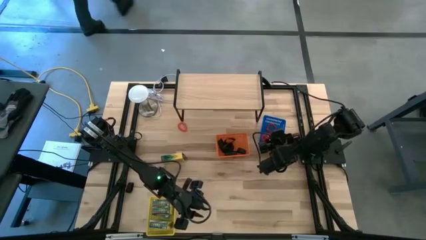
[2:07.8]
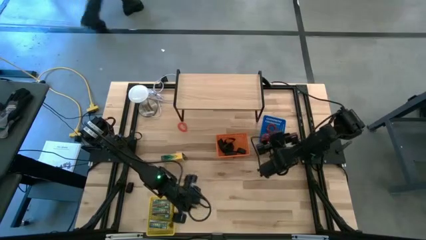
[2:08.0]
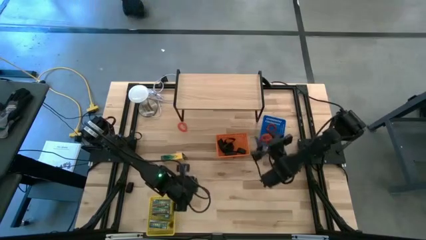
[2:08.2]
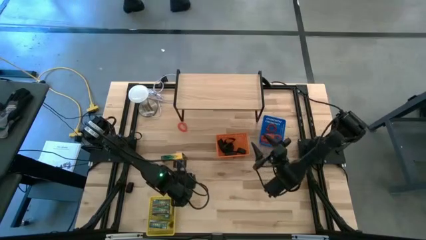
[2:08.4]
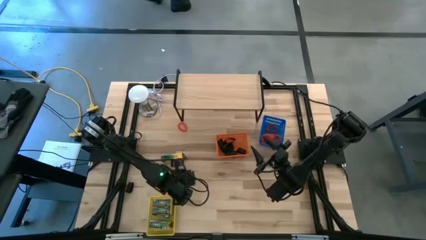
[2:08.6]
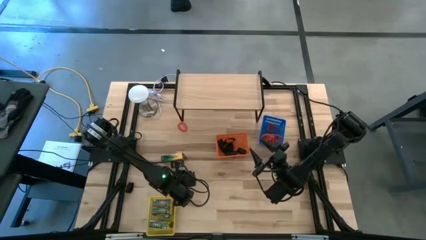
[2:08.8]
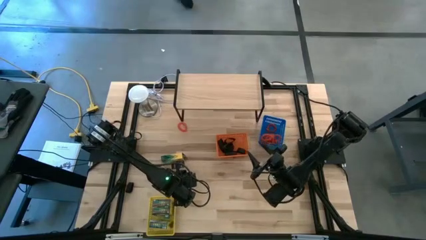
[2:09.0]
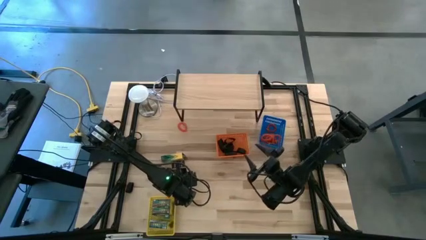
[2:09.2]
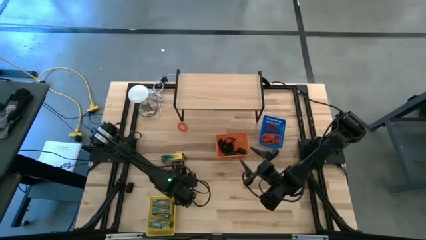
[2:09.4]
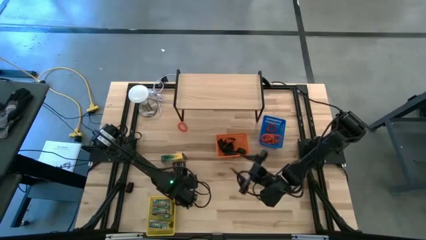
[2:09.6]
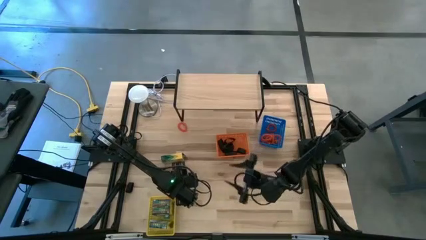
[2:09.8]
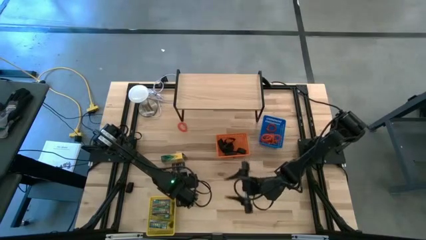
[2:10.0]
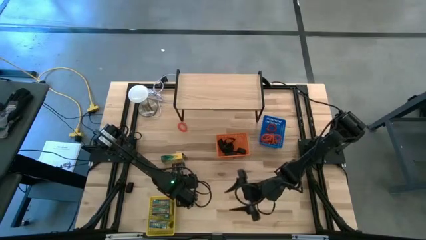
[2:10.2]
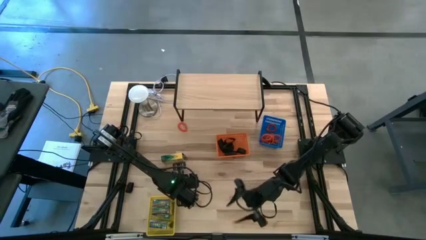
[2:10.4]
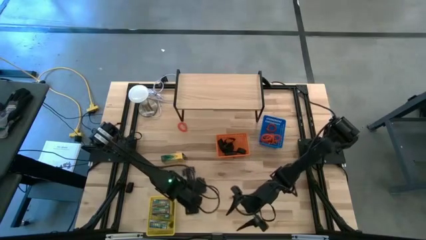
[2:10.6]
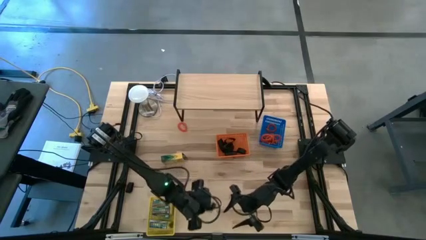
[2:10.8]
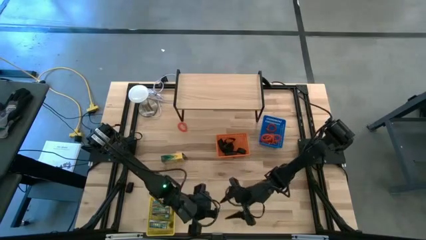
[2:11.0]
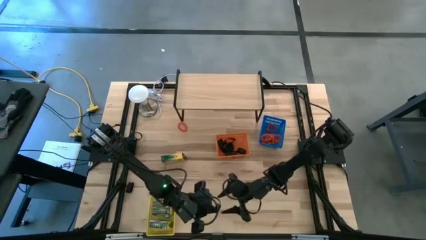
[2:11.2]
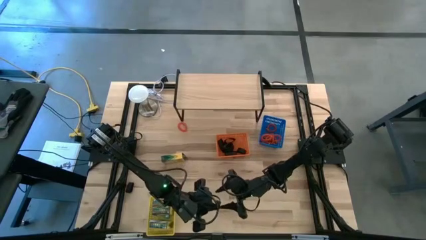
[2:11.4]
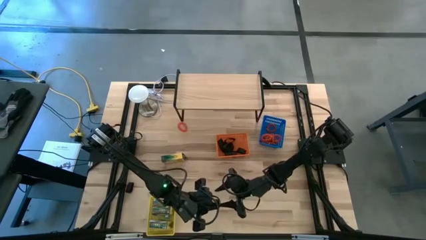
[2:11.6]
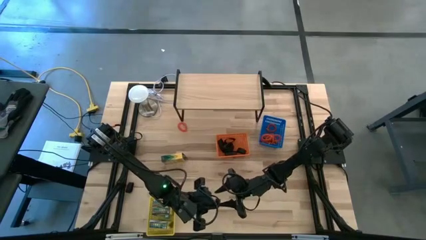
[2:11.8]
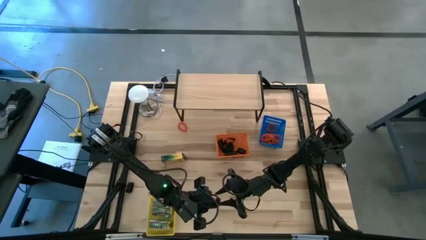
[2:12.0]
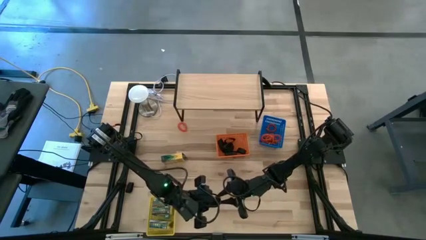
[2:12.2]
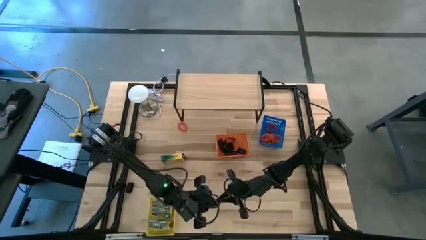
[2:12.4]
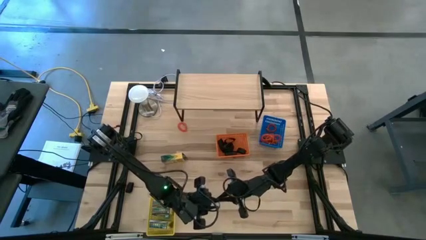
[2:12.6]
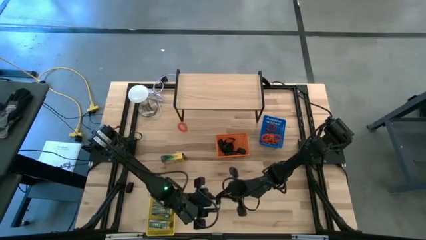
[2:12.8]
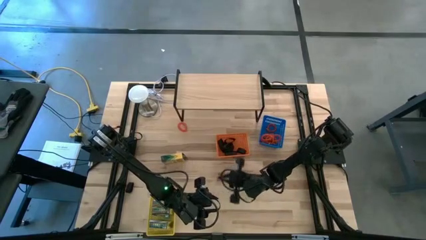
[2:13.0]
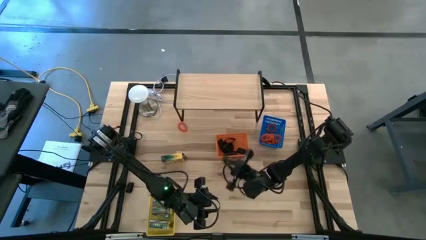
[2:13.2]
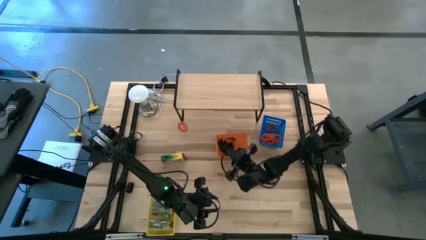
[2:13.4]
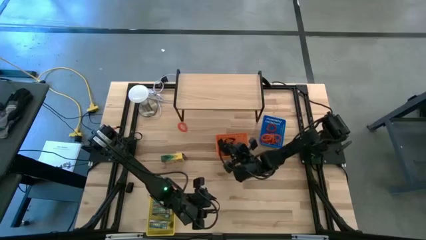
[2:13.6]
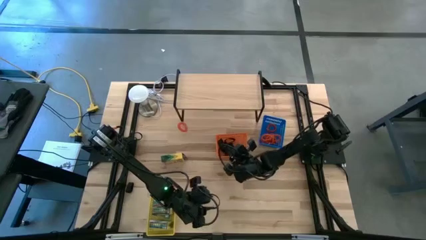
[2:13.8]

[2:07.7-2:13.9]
Task: Pick & Place Office Desk Supplies
Put the rubberband into the orange bin

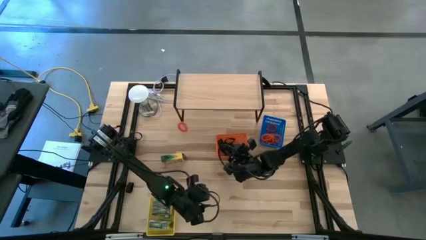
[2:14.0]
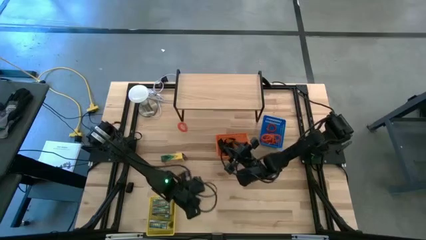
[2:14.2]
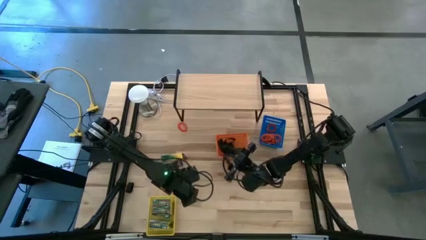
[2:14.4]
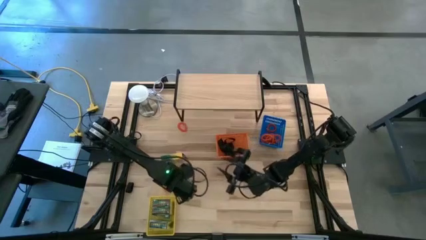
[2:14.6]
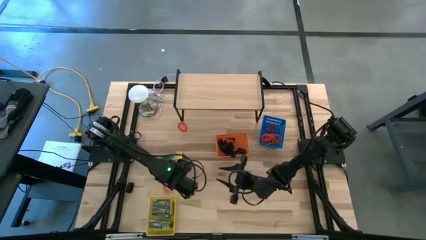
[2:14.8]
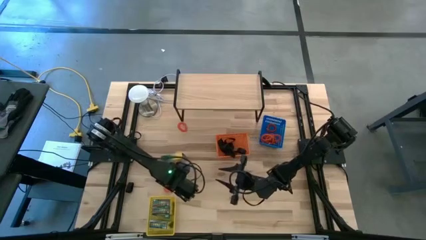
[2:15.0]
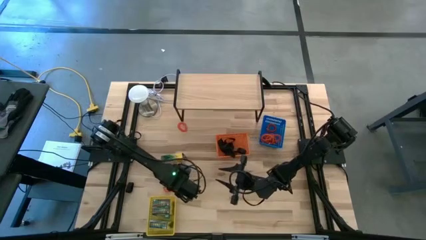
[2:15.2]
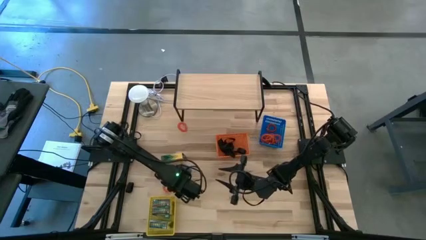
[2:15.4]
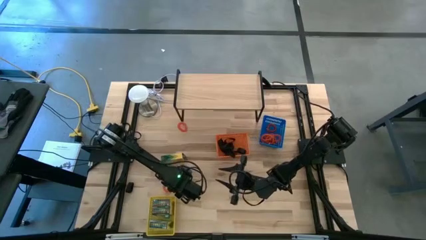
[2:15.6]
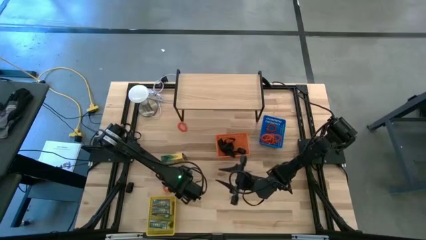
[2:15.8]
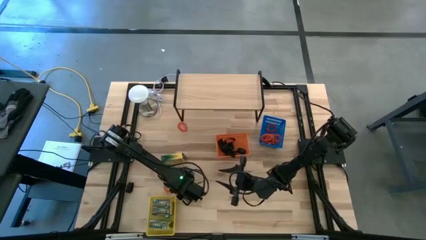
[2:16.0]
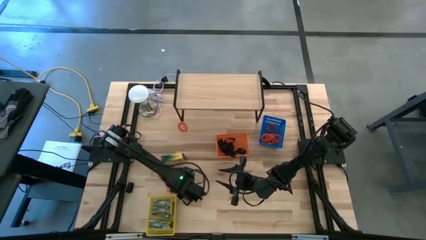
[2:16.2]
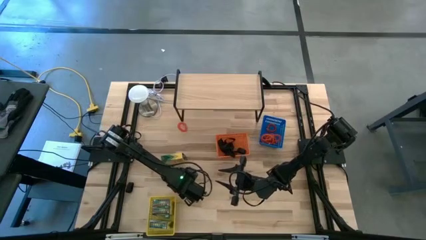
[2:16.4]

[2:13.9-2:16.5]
Put the spring keychain into the blue bin

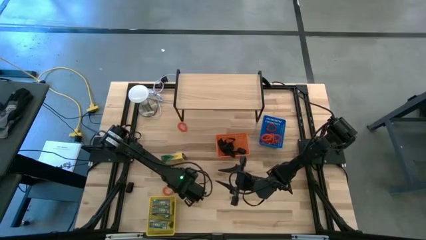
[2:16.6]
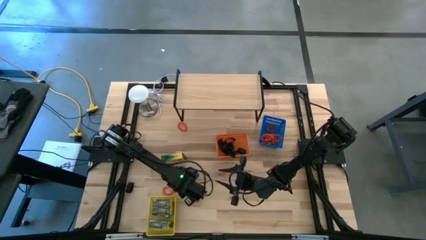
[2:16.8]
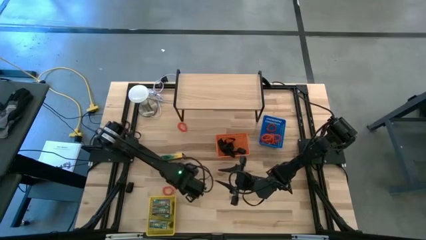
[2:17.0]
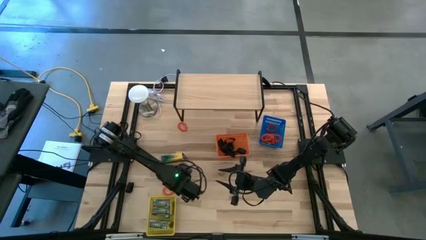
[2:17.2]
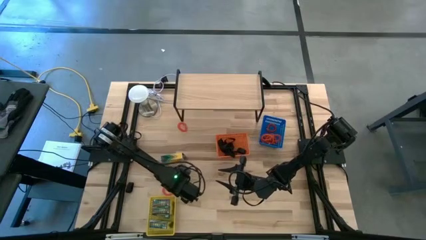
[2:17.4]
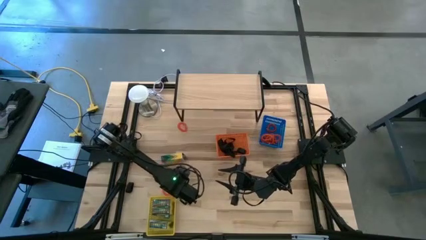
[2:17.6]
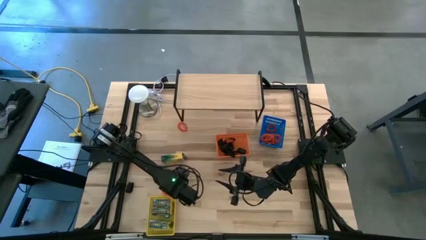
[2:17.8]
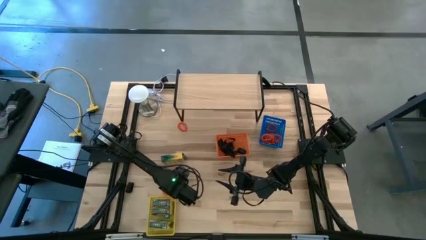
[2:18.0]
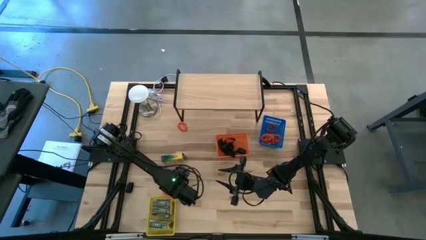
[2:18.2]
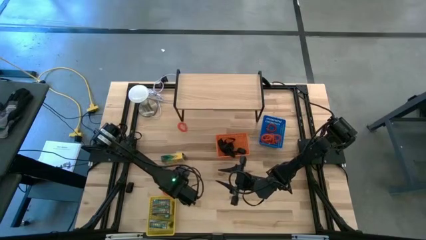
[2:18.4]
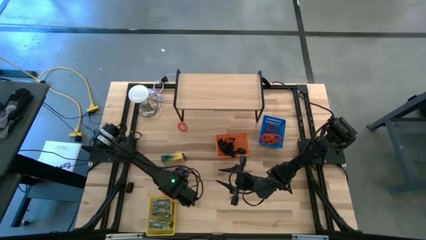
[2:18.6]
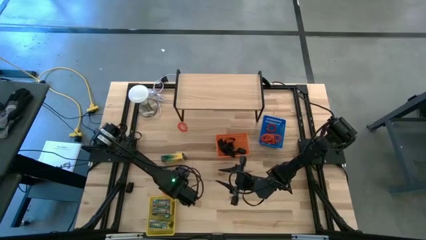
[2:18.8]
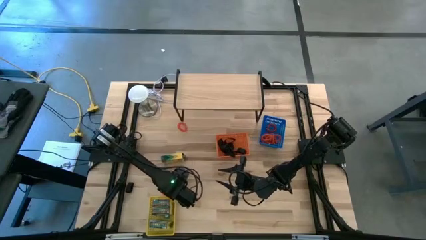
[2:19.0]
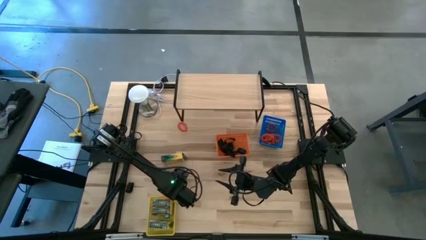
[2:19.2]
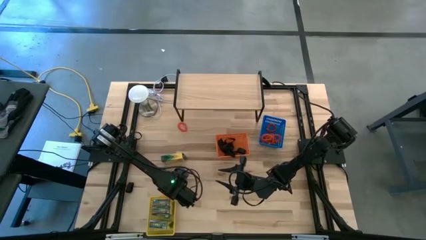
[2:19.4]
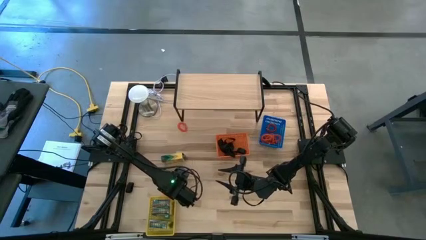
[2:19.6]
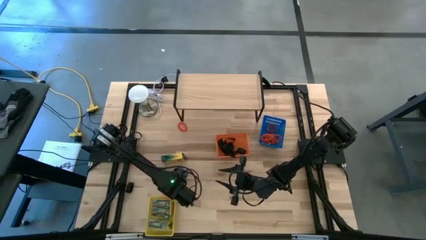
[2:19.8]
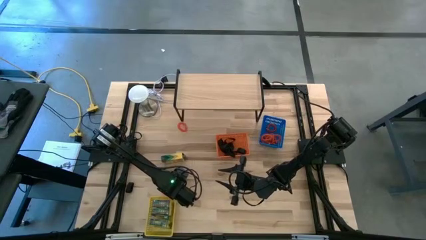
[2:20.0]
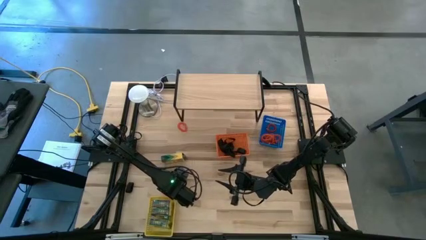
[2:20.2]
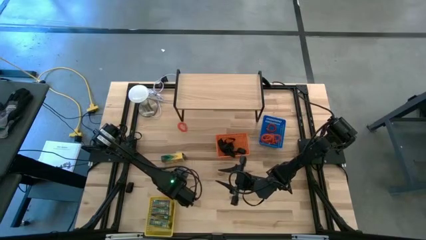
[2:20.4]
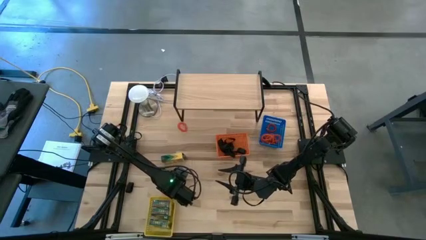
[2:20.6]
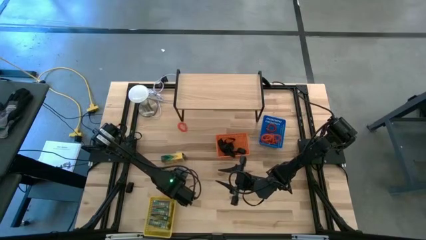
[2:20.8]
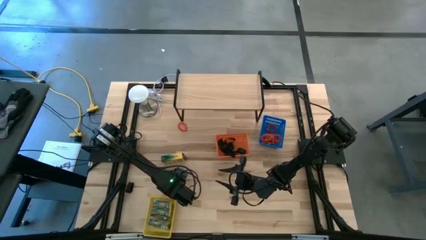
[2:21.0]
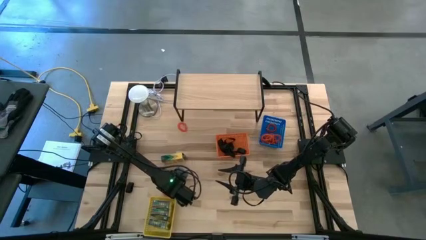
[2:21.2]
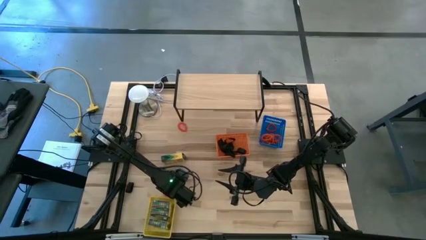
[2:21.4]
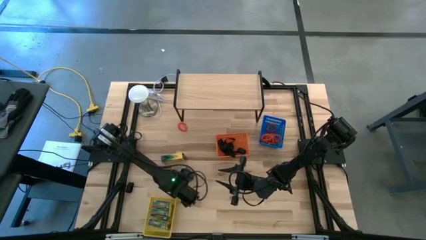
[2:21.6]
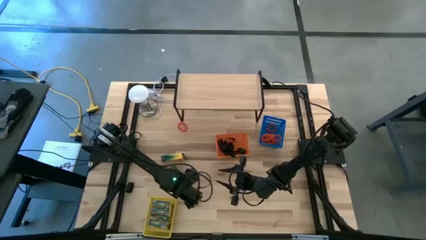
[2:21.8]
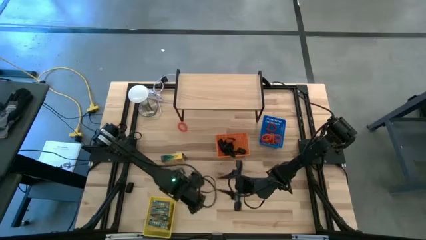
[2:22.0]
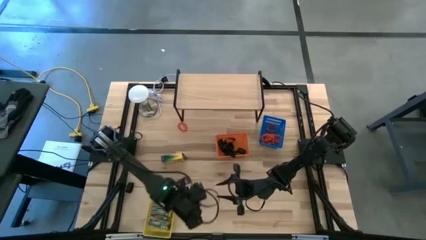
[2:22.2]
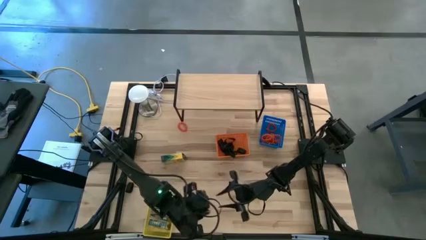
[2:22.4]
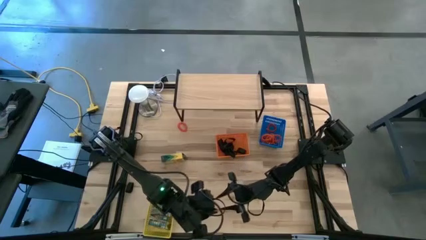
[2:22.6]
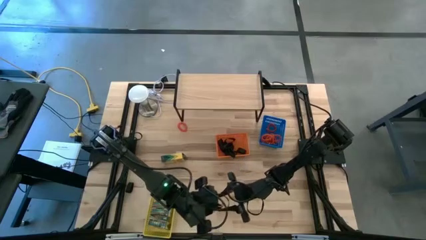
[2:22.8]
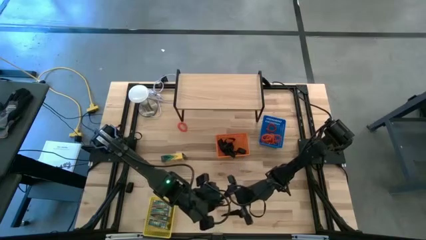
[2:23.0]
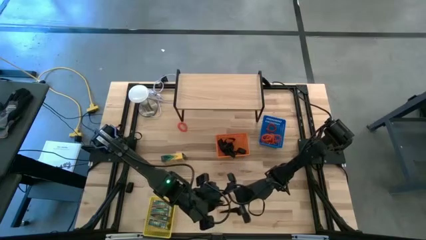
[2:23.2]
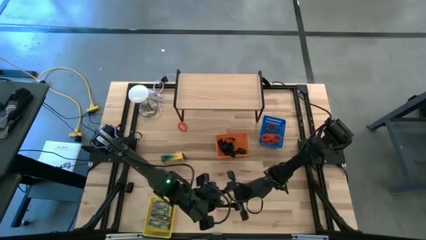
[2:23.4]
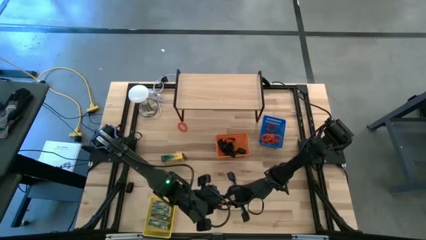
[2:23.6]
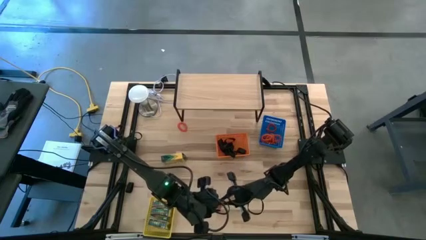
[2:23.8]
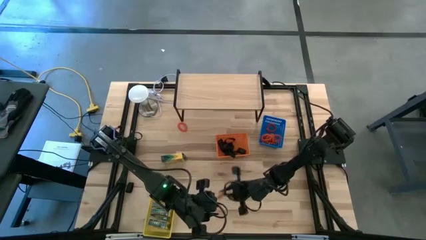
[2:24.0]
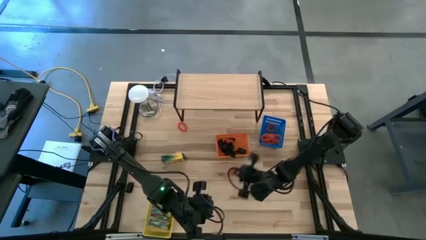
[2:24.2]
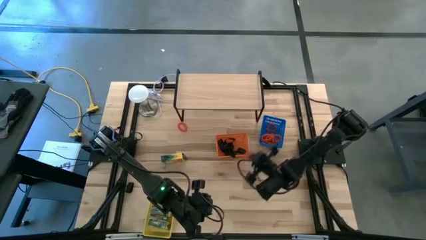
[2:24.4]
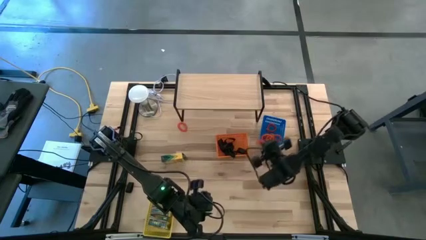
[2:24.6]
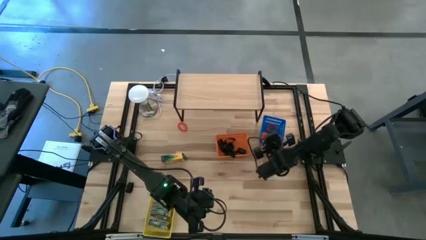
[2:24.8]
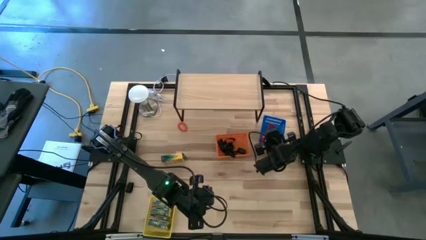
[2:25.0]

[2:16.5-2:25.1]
Put the spring keychain into the blue bin
